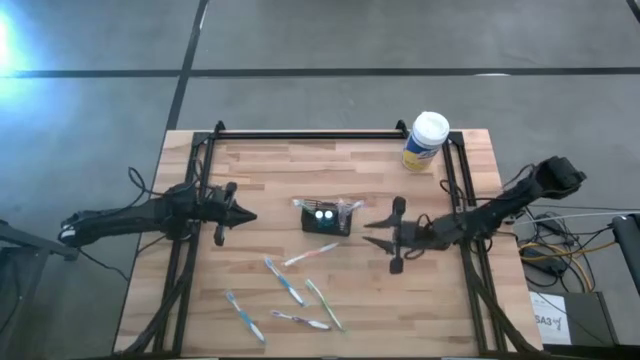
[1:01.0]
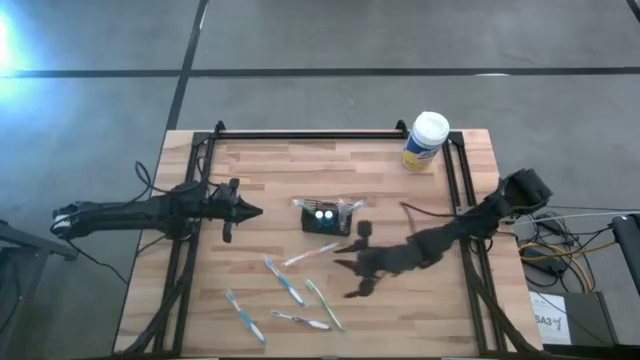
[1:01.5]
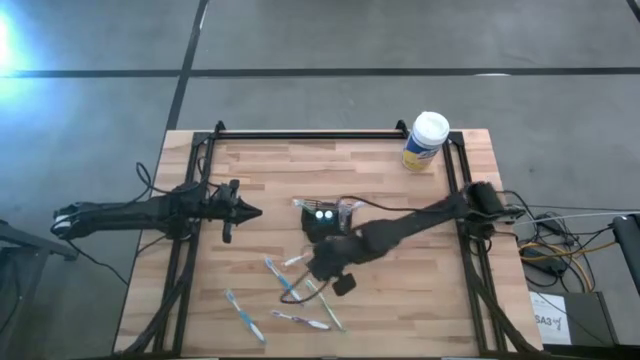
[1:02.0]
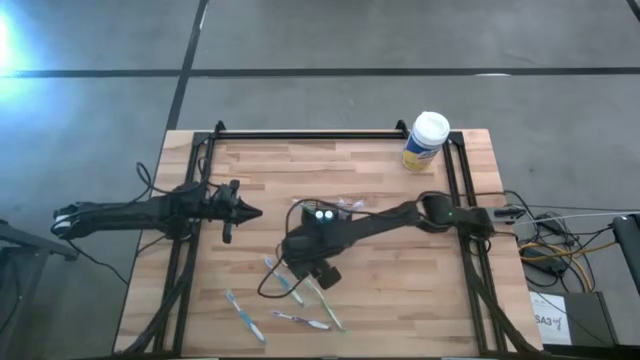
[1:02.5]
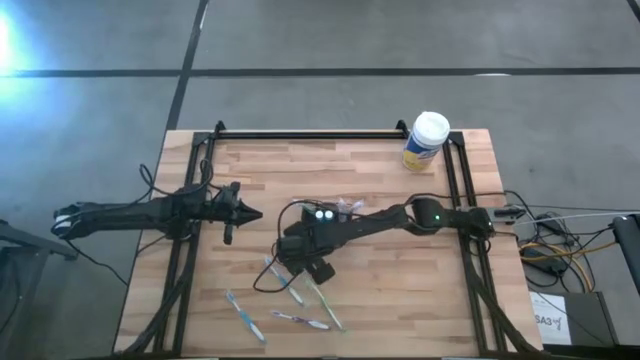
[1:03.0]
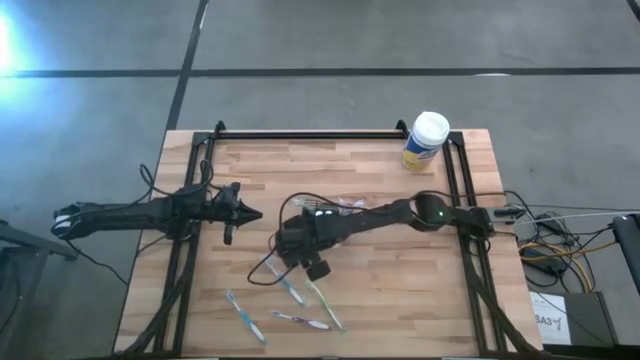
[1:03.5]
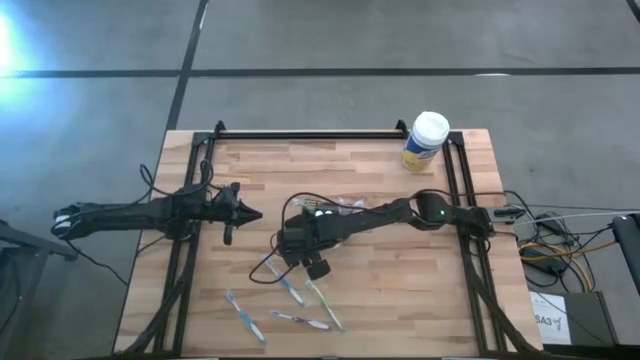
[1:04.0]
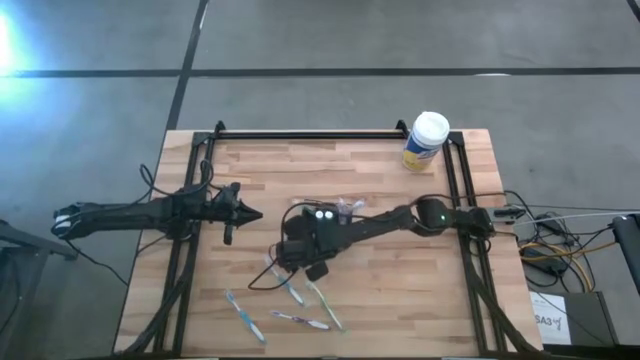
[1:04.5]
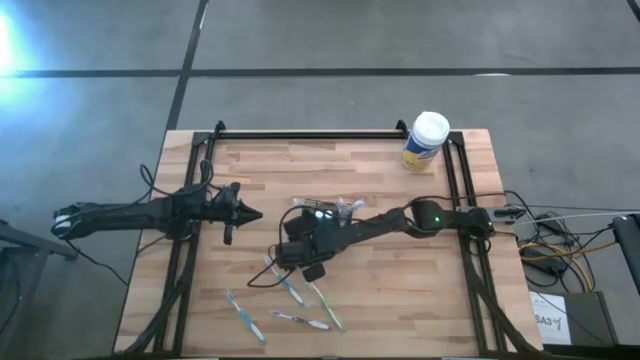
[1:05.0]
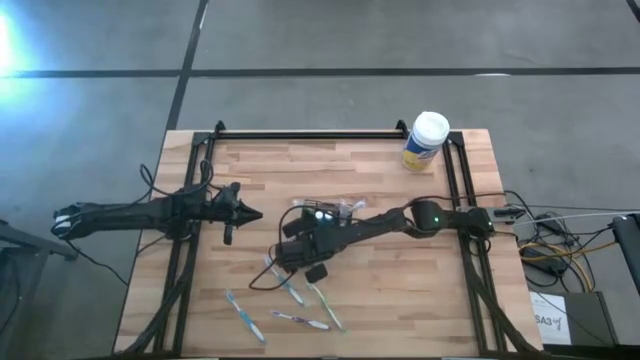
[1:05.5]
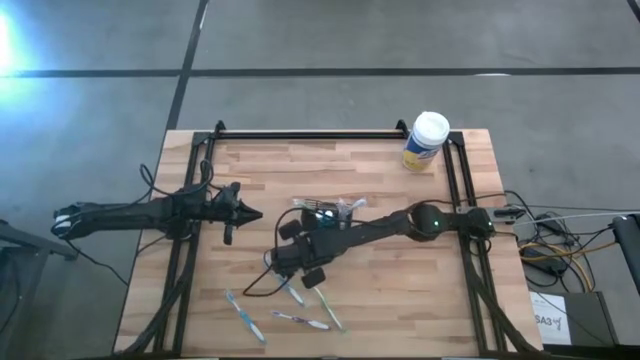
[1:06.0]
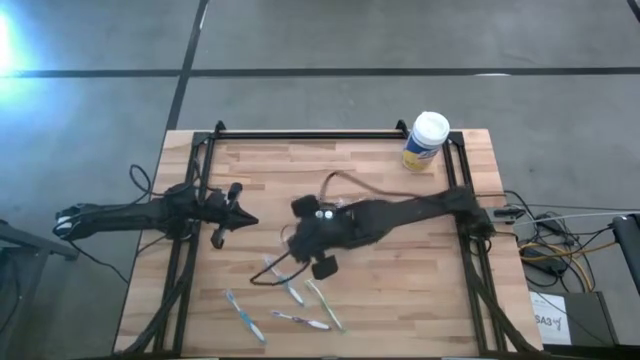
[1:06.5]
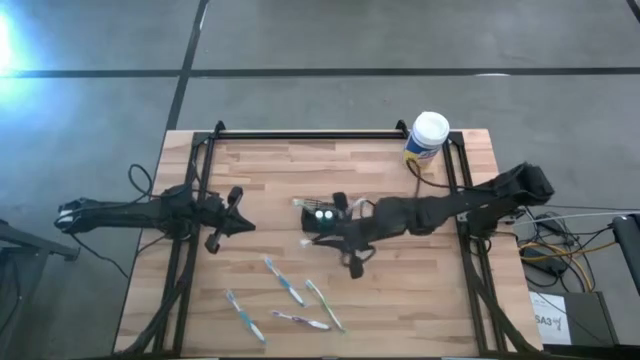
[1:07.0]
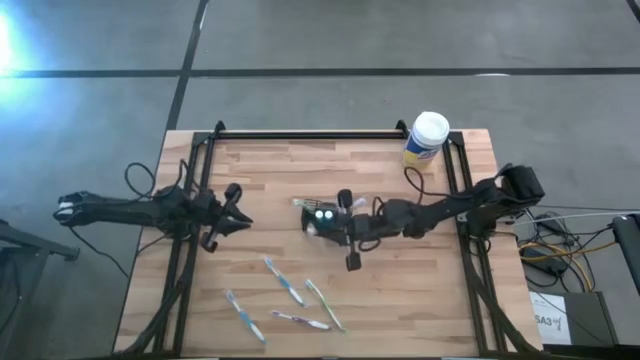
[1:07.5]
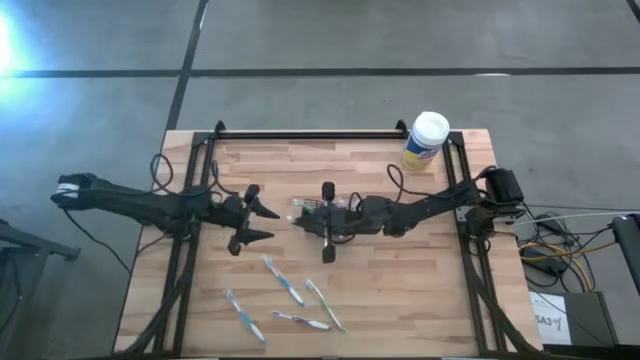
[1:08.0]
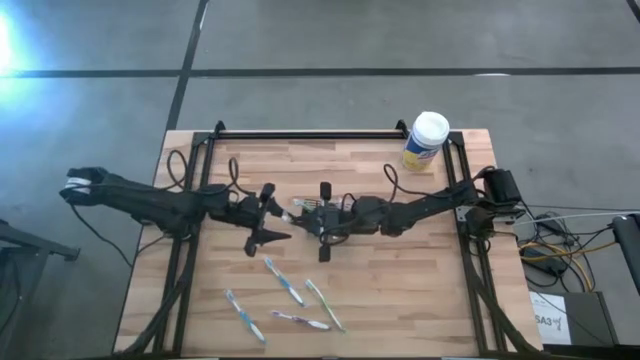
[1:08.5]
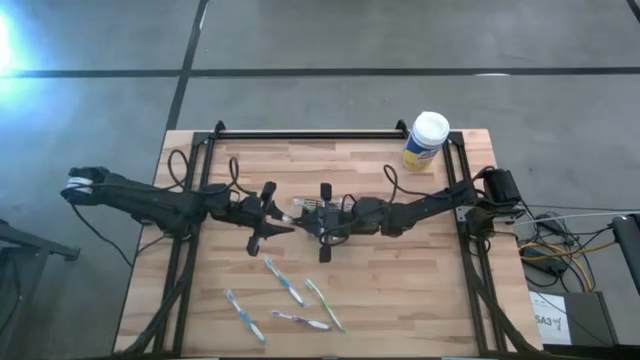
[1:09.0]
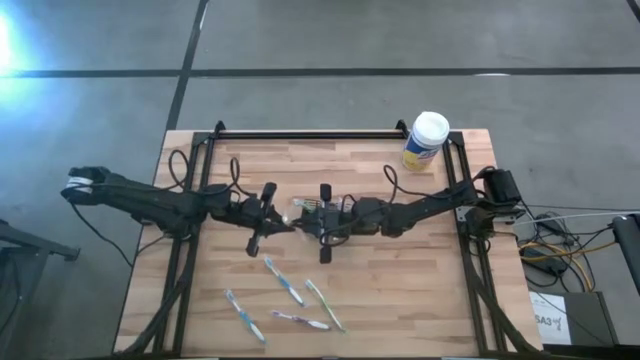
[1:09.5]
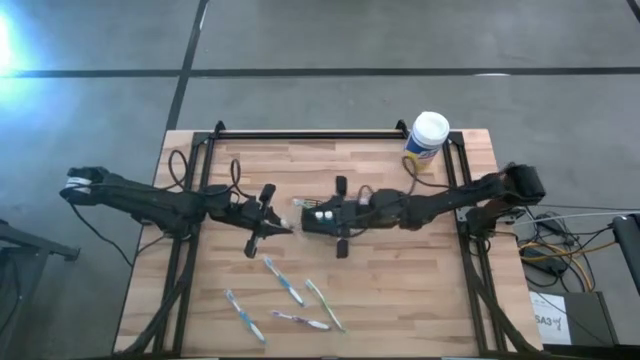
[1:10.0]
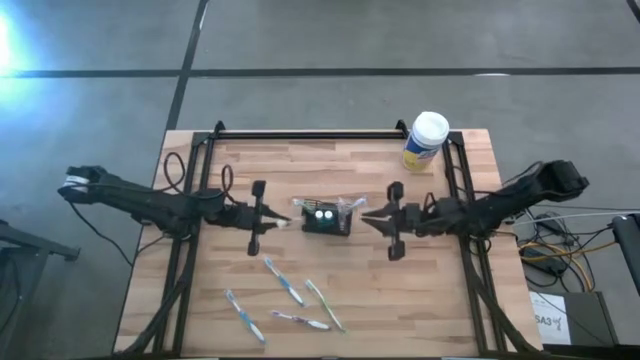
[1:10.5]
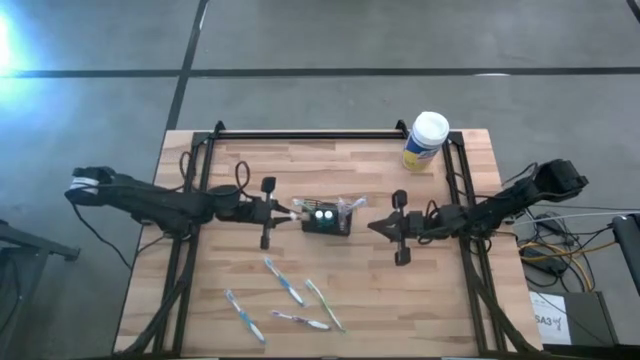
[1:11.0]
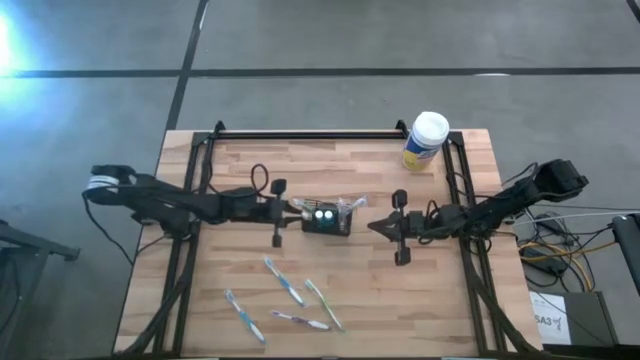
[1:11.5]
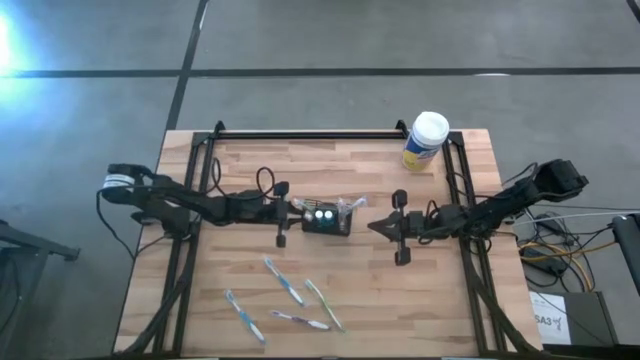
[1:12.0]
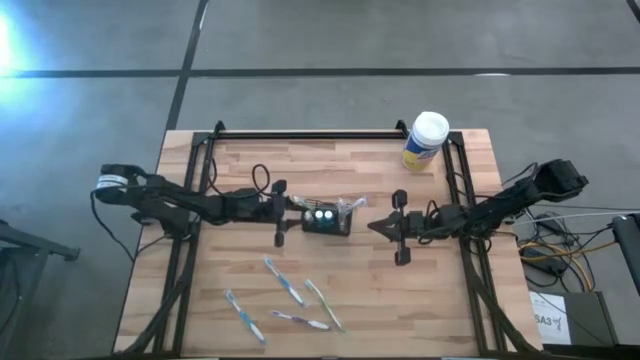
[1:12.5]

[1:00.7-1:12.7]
Task: Pick & Place toothbrushing station
Put the orange toothbrush into the black mesh organizer

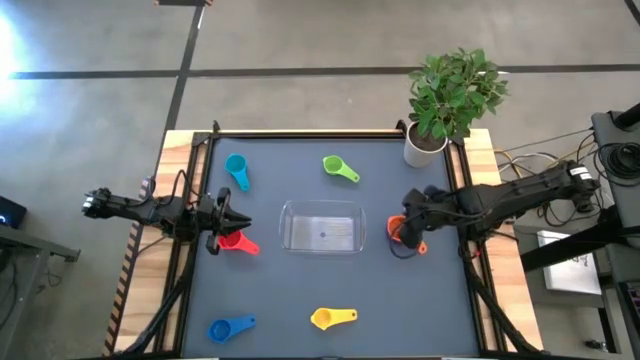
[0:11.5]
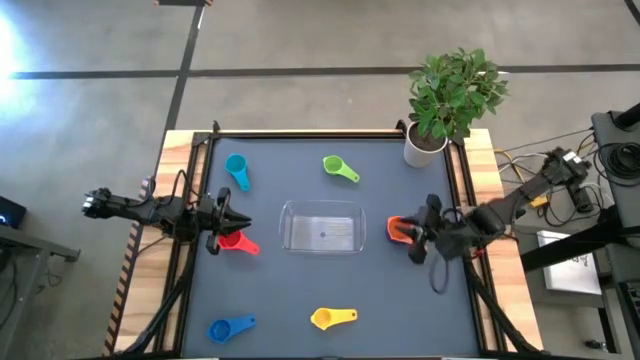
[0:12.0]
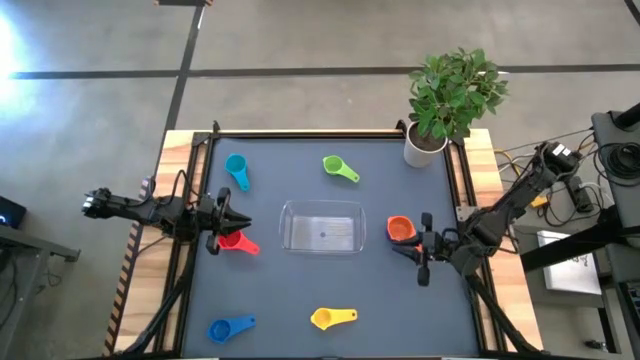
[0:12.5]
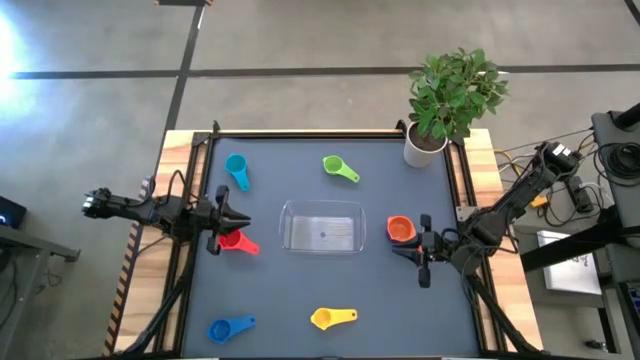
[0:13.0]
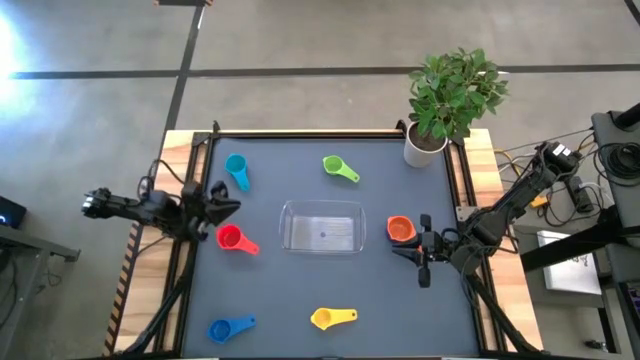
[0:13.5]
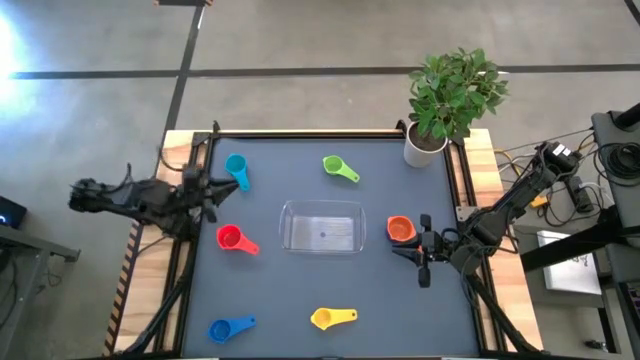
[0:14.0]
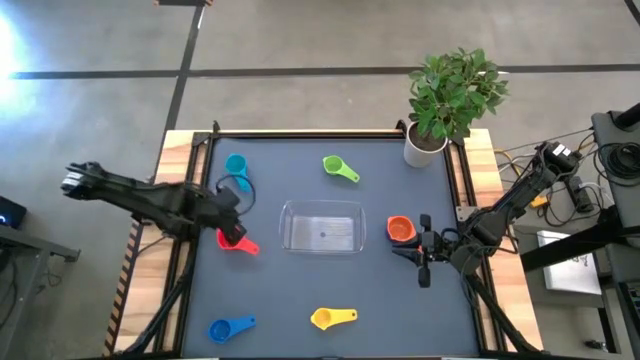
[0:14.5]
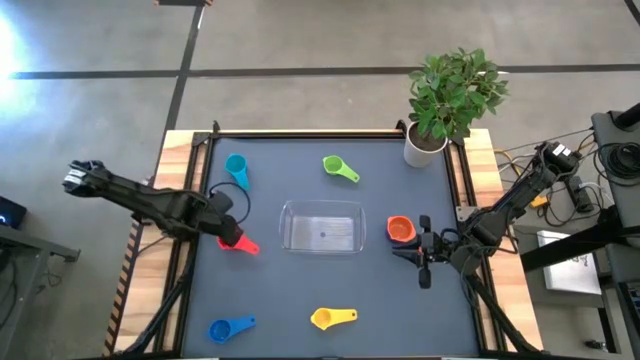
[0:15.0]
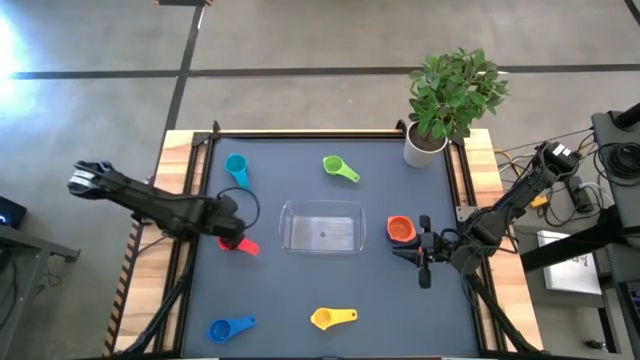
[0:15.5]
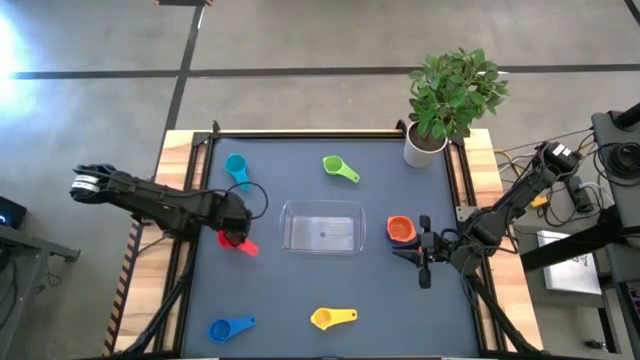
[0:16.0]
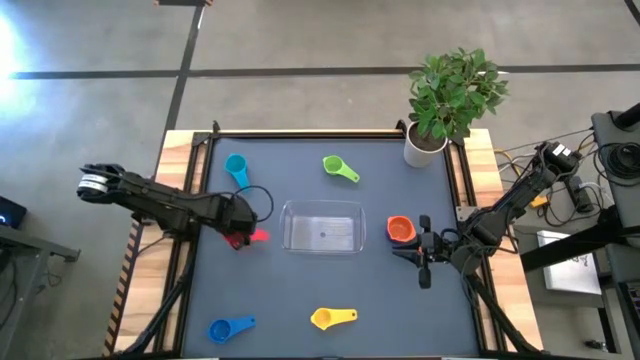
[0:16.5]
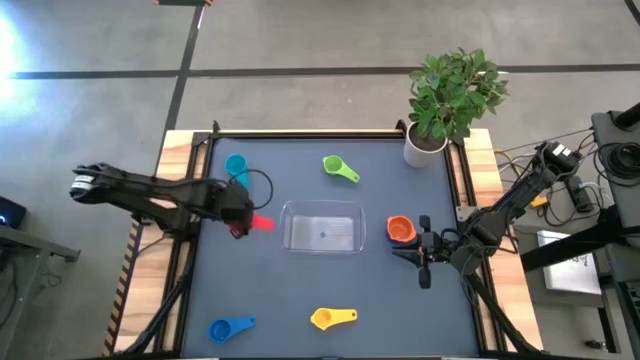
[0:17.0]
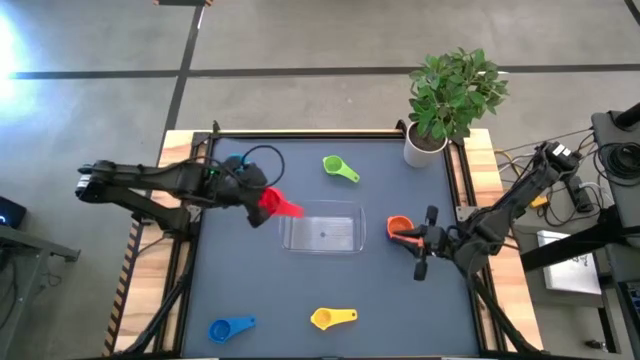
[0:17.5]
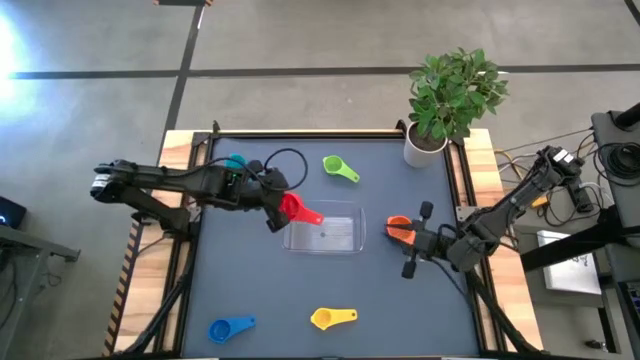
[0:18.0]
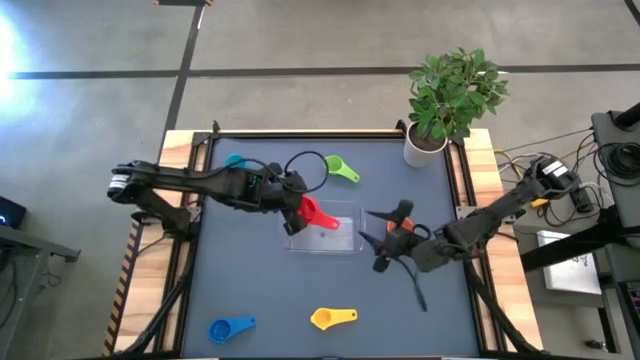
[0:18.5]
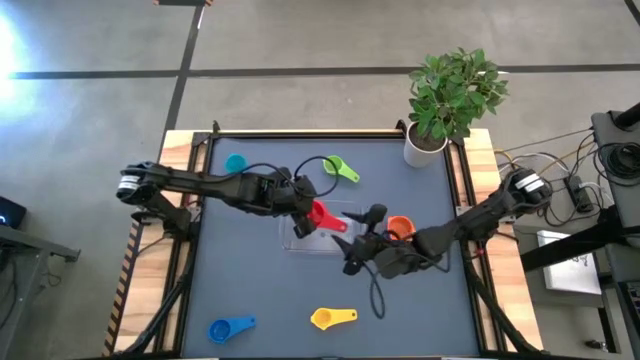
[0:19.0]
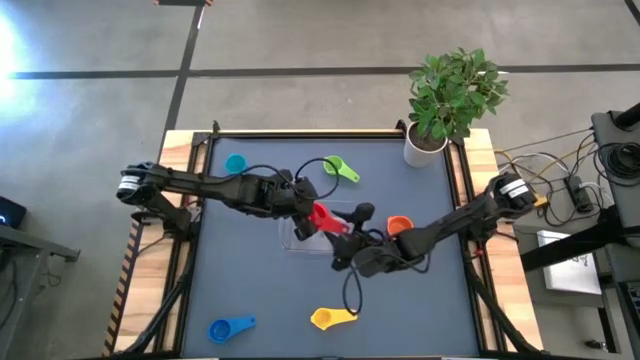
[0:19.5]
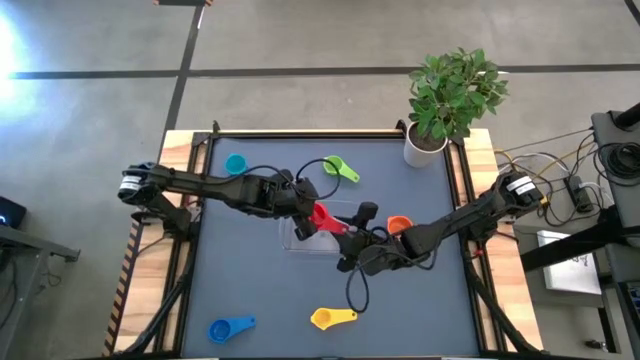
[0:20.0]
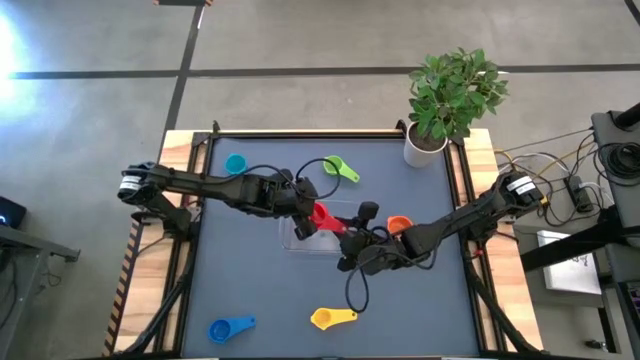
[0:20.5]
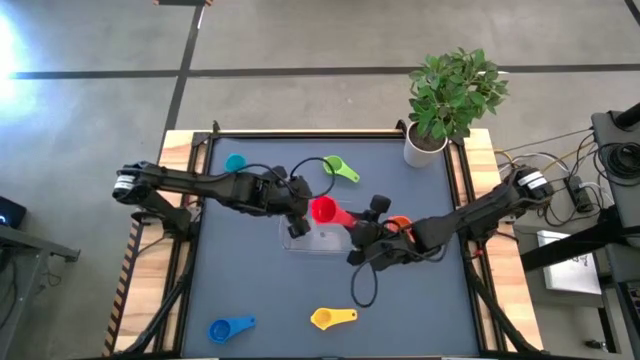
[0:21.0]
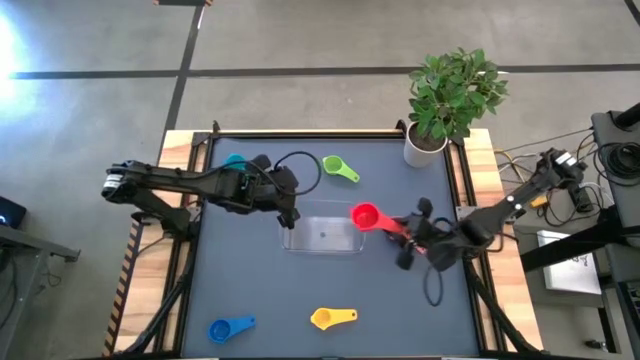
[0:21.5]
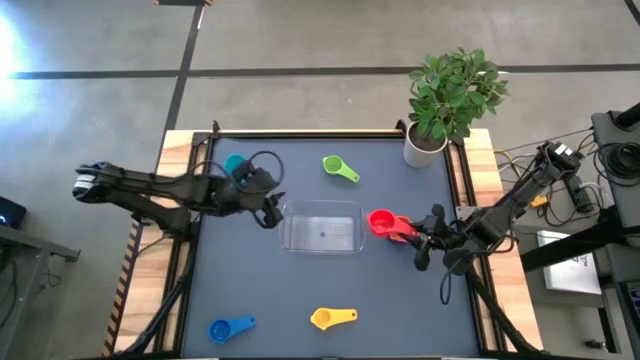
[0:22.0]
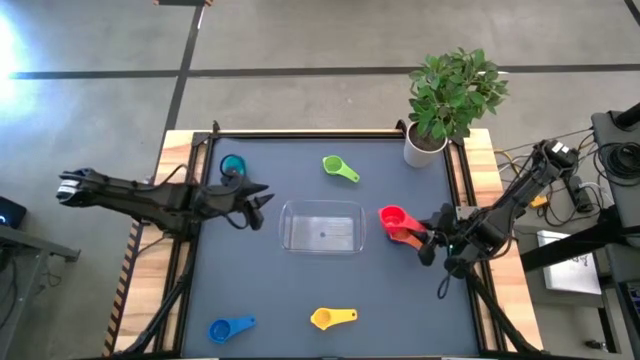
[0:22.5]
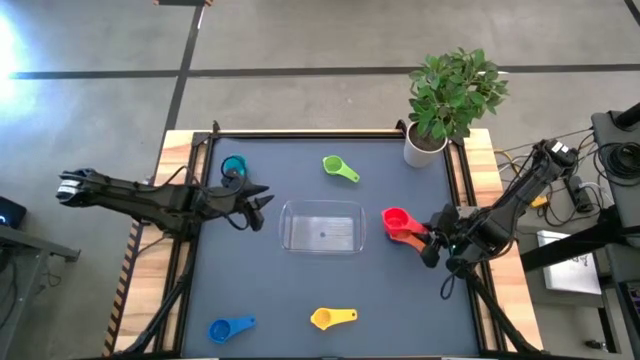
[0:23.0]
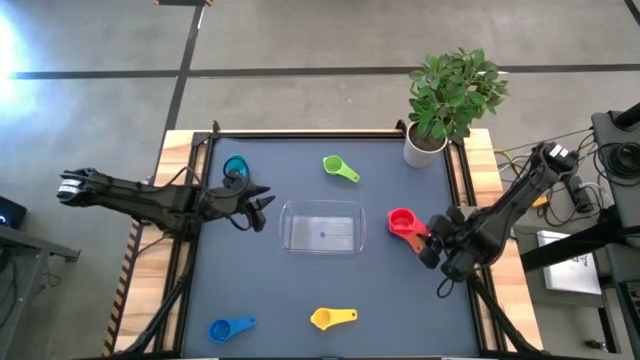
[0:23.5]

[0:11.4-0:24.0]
Task: Nest measuring cups in basket
Stack the red measuring cup on top of the orange measuring cup
